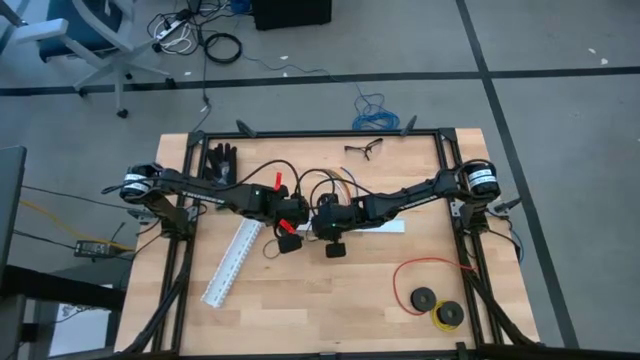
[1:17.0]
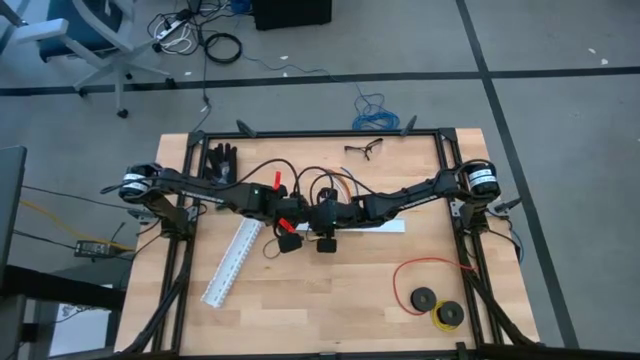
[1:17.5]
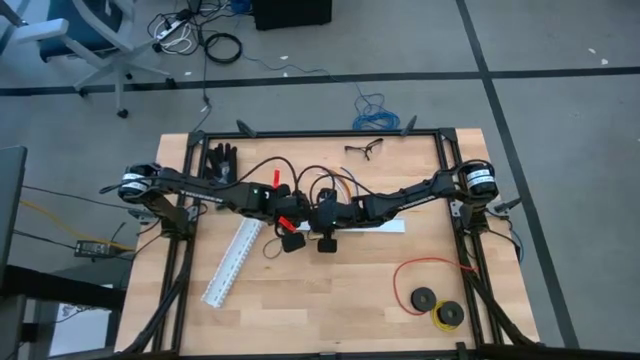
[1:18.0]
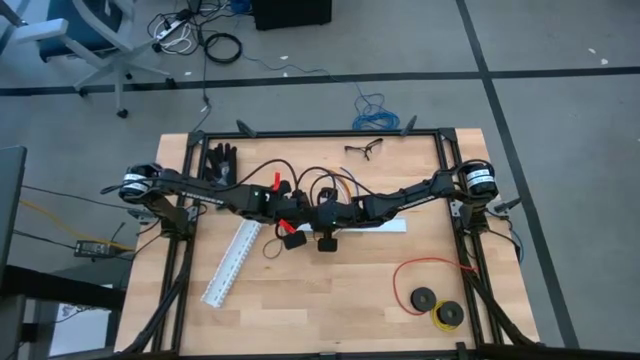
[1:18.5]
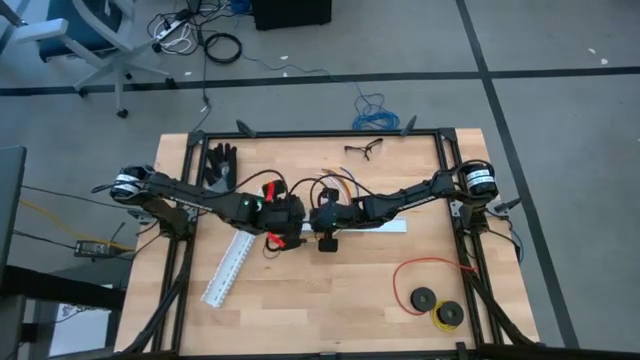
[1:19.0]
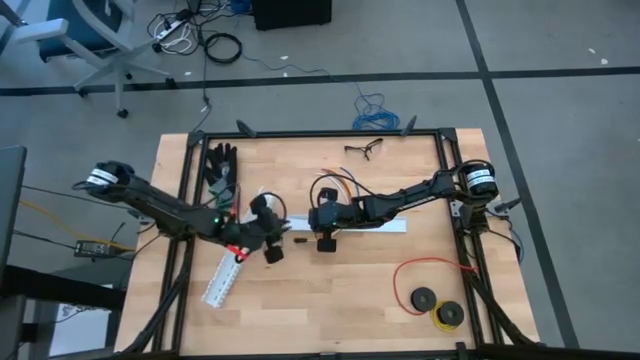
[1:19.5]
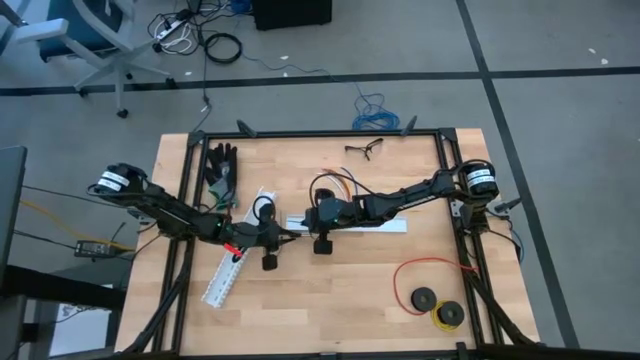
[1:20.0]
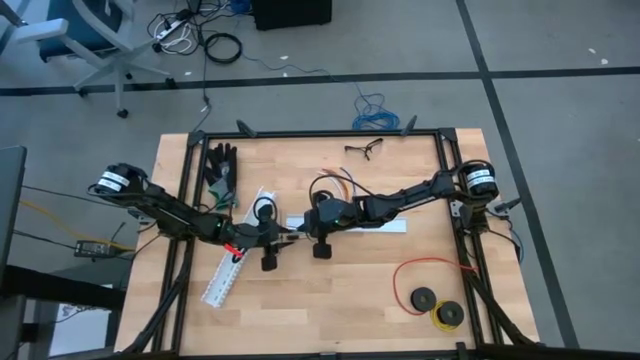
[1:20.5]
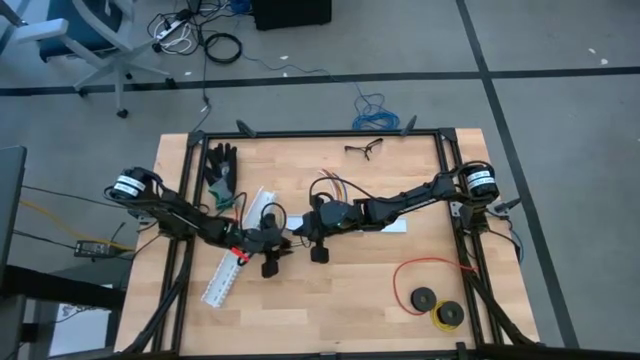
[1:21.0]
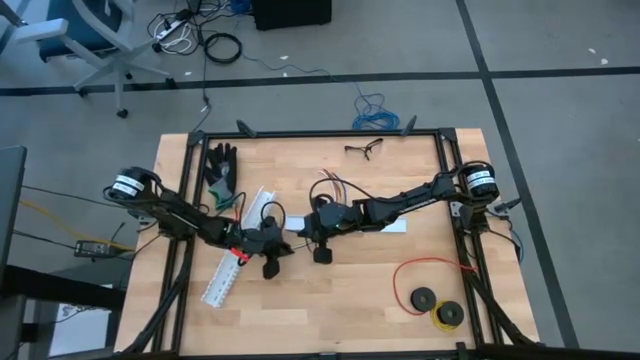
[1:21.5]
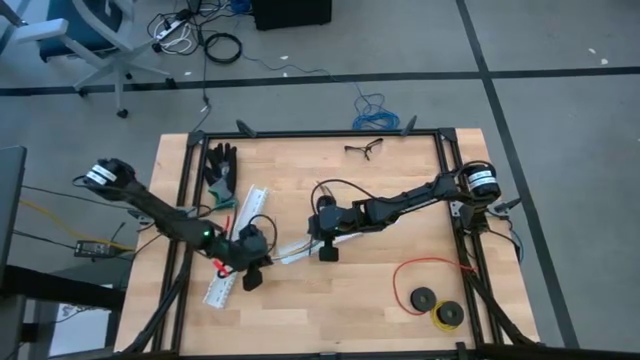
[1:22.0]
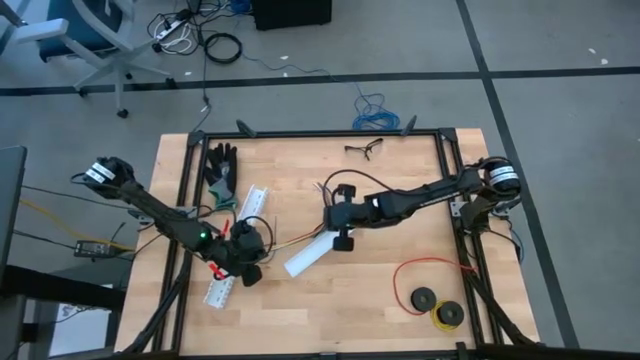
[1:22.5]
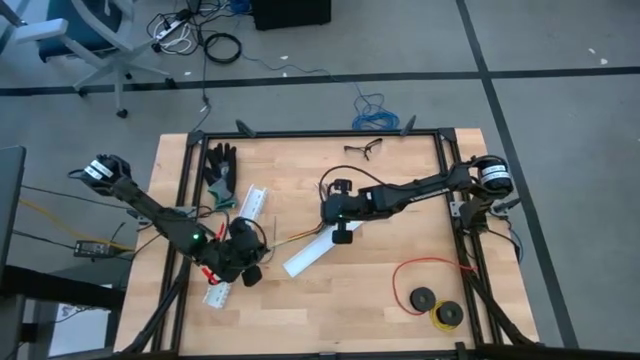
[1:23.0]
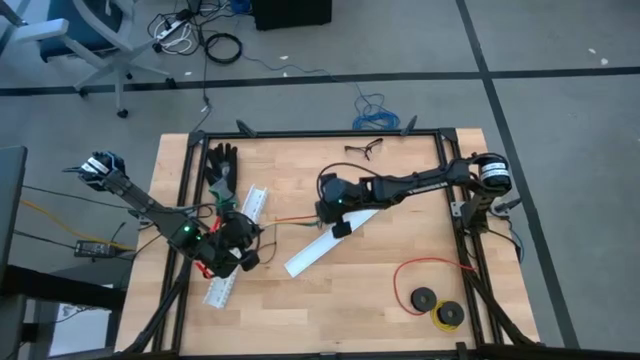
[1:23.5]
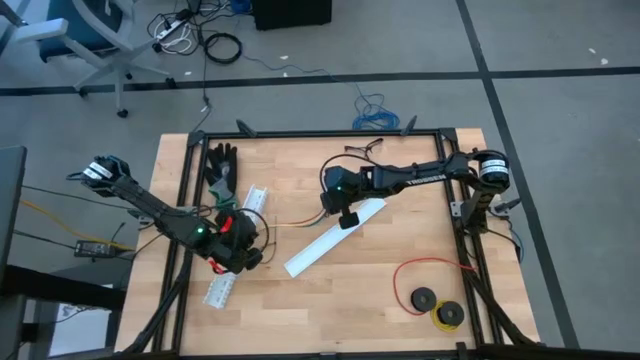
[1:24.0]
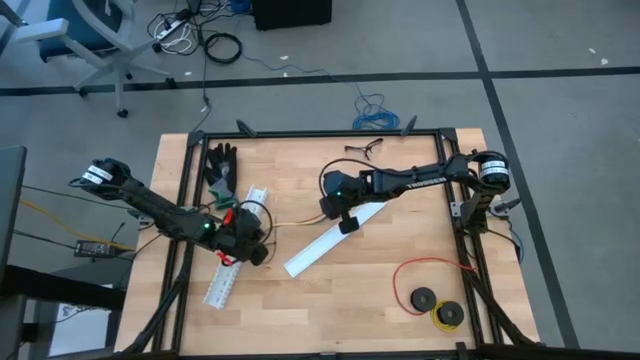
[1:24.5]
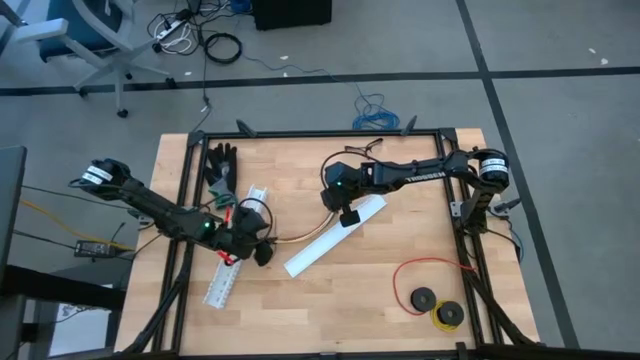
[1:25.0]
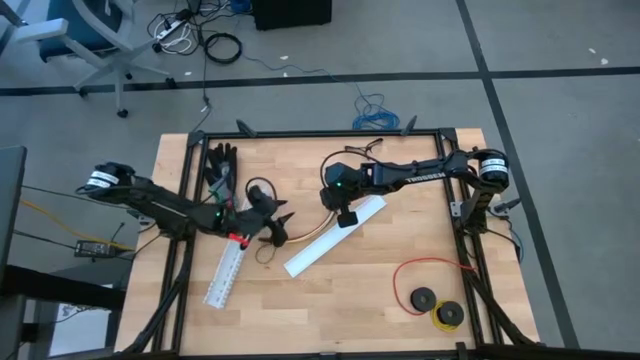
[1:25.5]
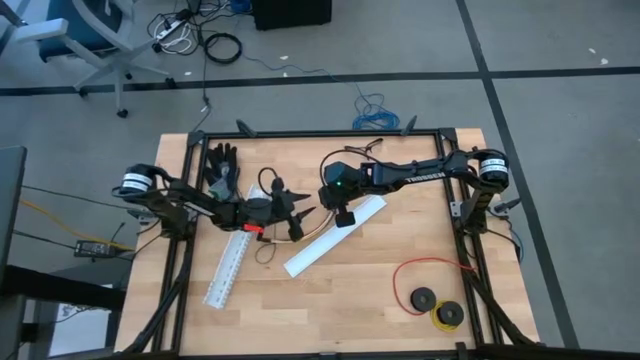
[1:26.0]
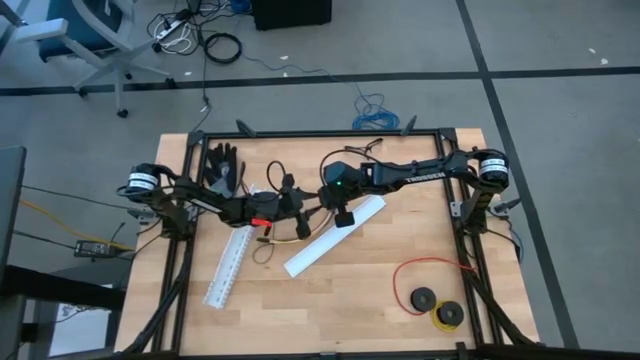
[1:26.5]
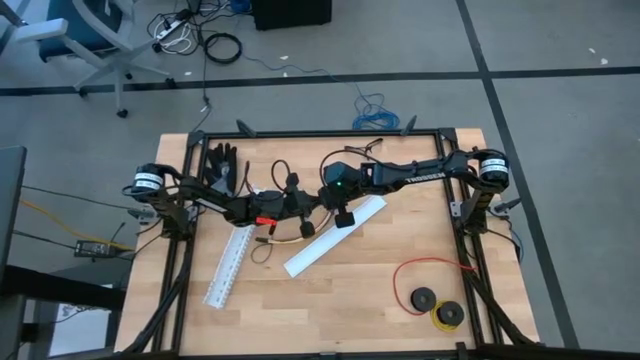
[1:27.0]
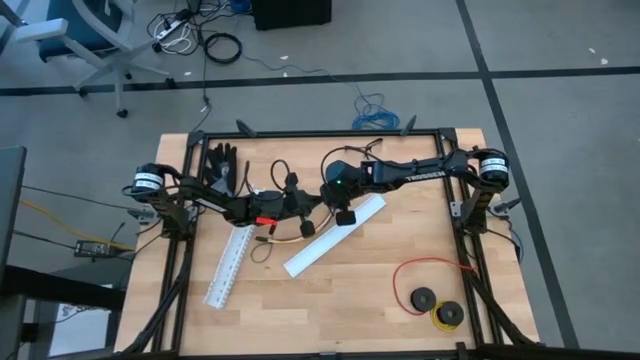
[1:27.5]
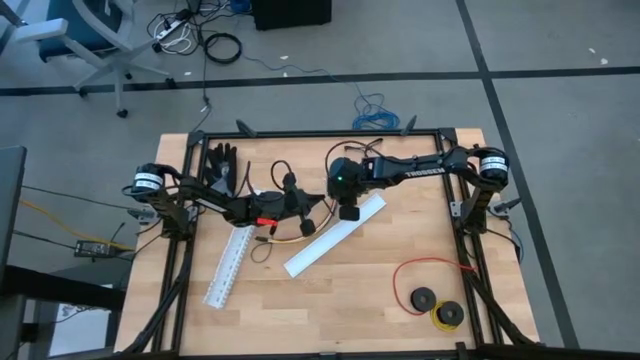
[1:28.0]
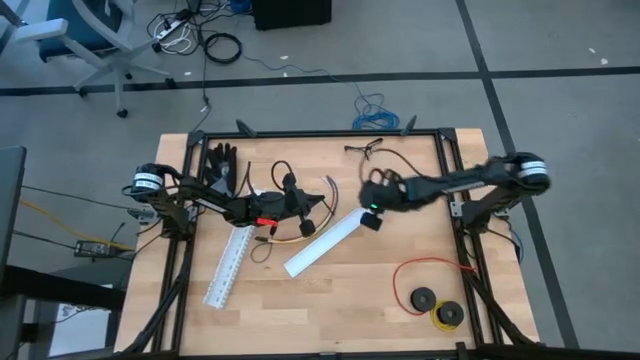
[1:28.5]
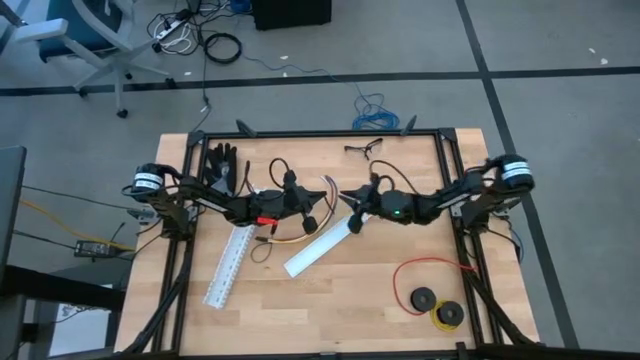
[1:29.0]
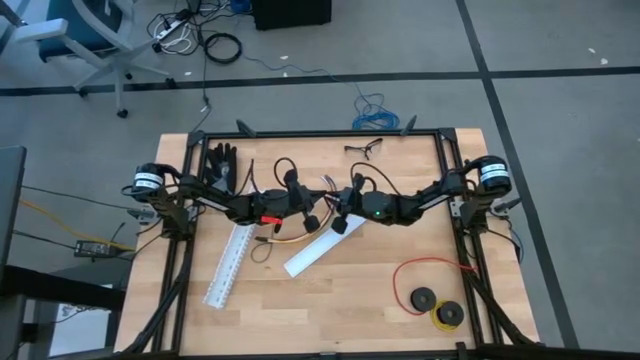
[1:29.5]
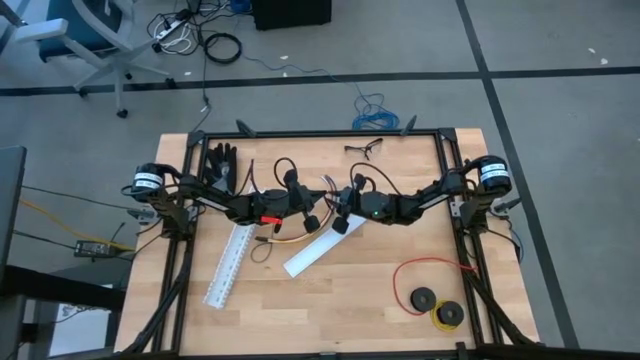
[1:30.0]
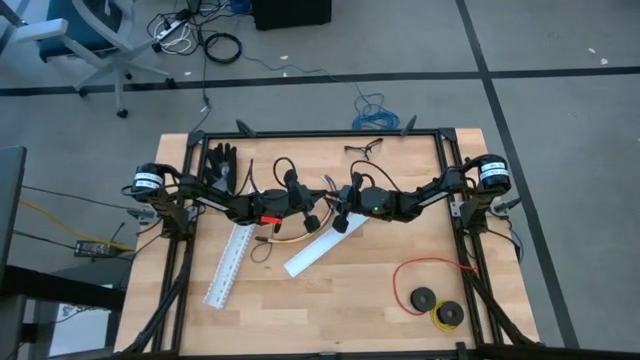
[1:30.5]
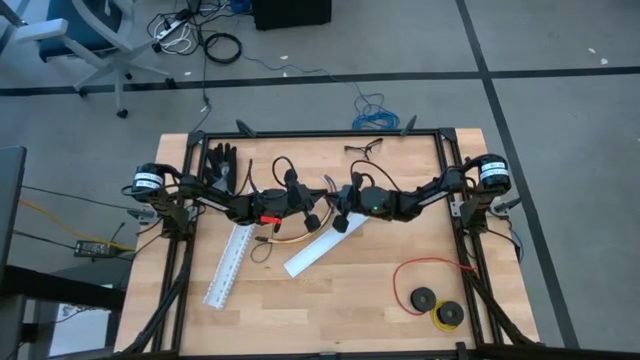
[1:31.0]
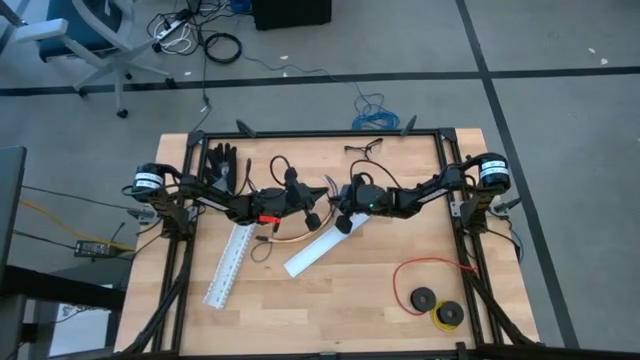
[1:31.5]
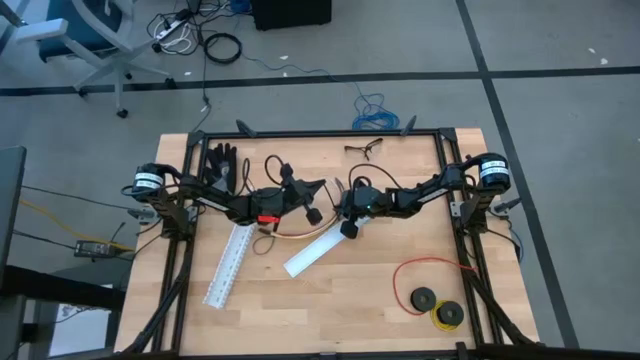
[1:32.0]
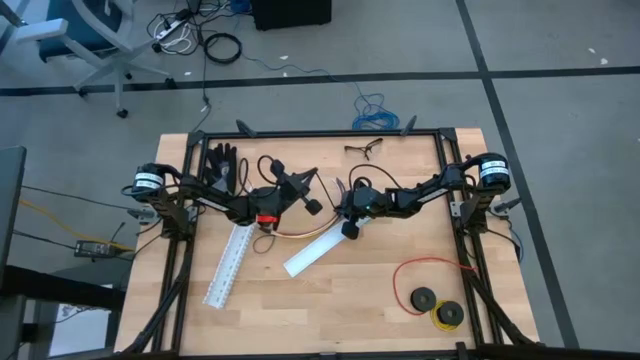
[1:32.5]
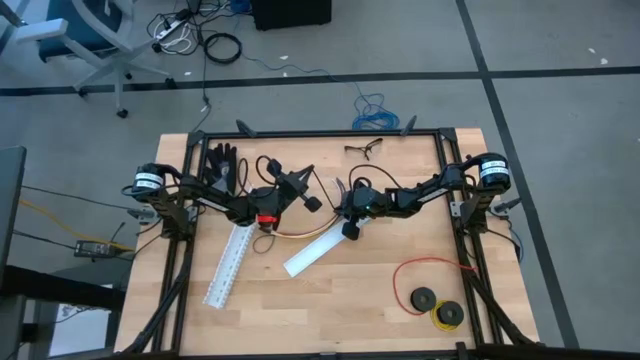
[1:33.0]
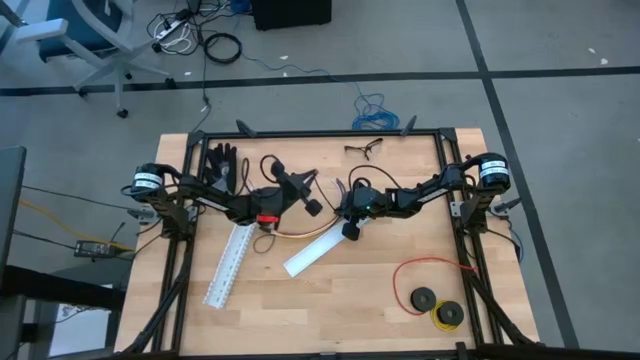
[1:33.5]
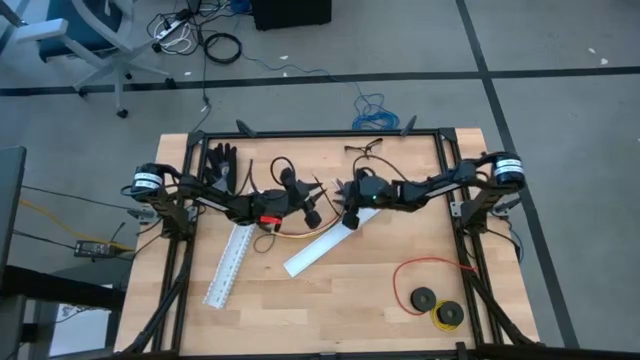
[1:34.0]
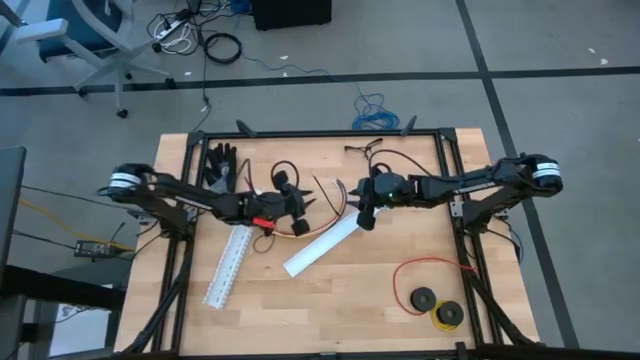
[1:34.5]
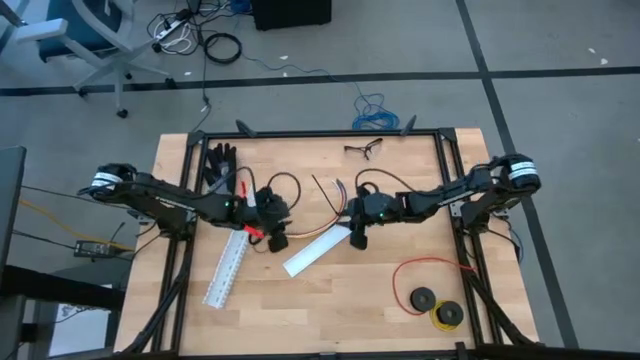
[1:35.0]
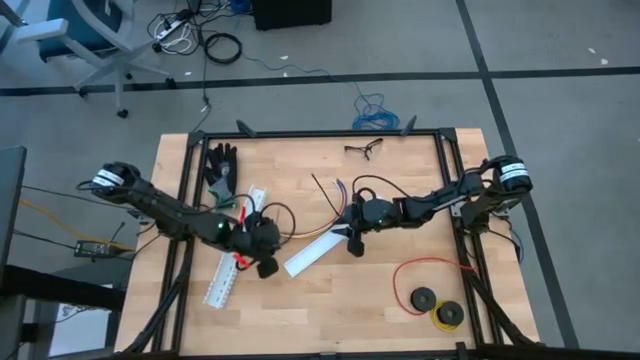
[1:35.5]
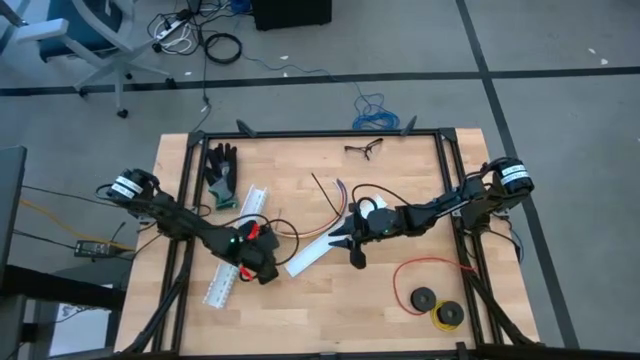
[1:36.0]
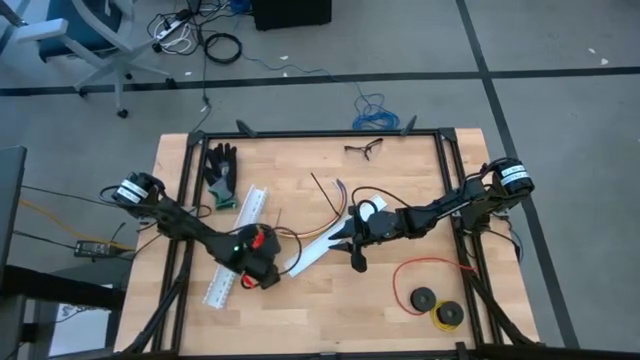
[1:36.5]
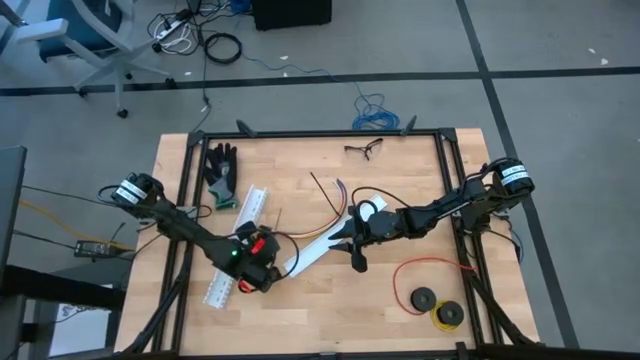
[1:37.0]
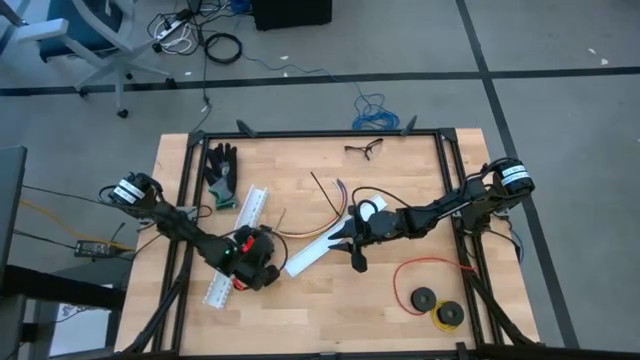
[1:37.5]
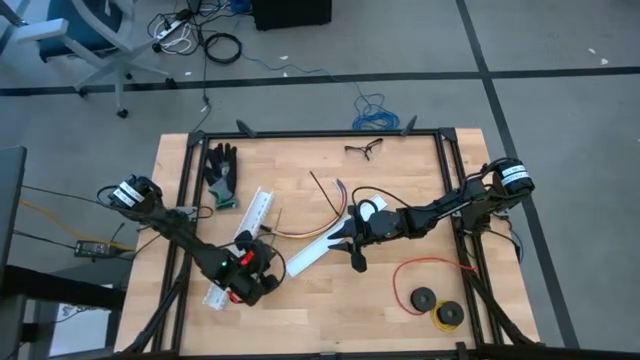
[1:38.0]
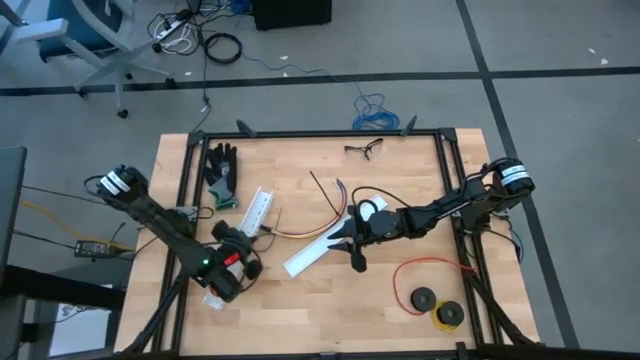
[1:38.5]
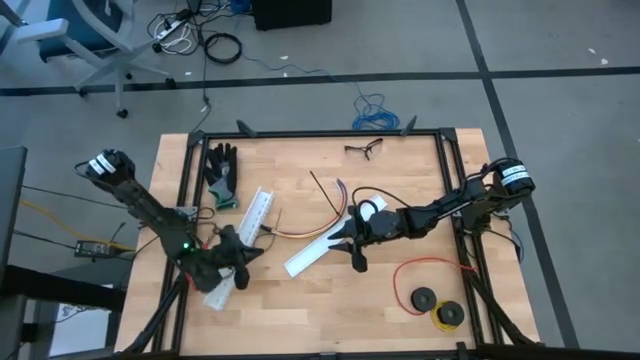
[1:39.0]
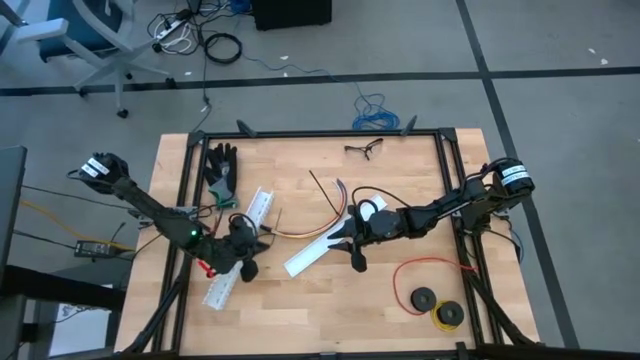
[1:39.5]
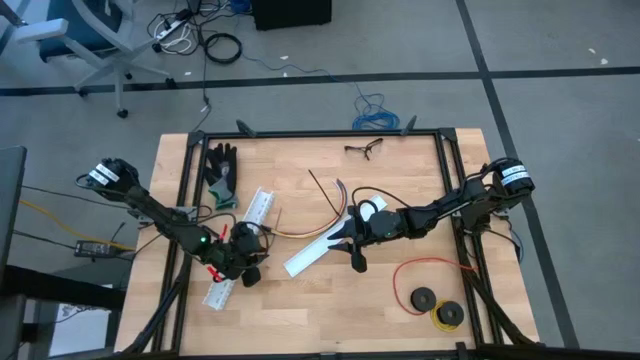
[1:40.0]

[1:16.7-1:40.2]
Task: Ziptie cables
Wrap the cables together using a zip tie
